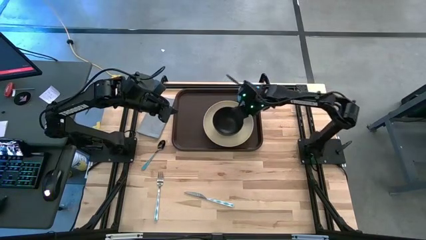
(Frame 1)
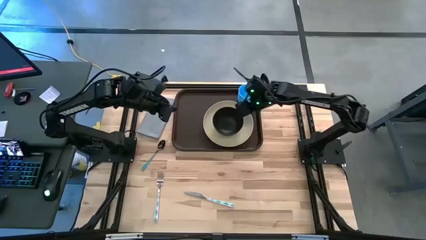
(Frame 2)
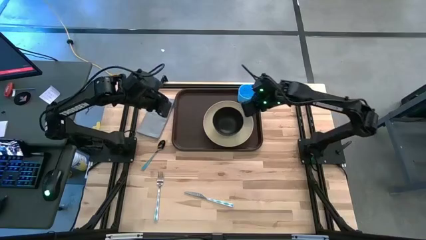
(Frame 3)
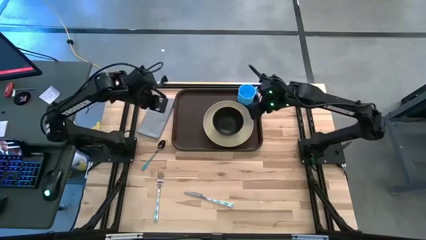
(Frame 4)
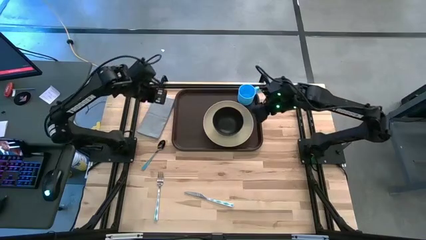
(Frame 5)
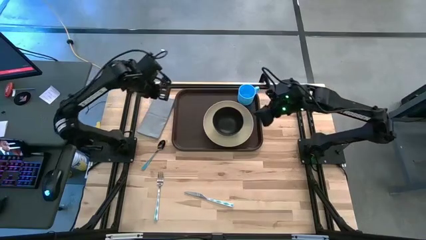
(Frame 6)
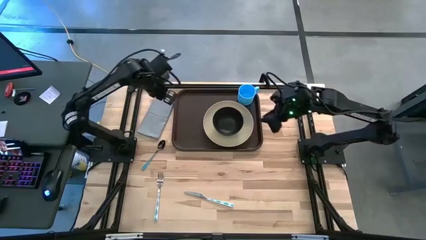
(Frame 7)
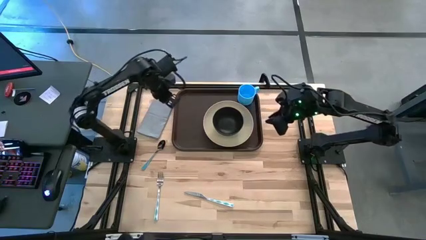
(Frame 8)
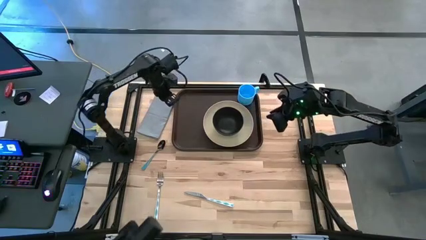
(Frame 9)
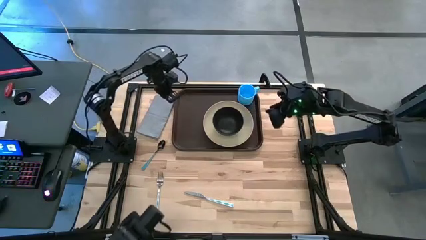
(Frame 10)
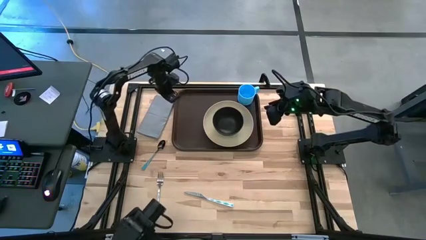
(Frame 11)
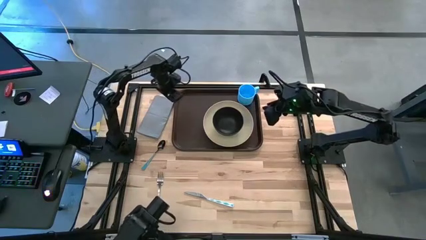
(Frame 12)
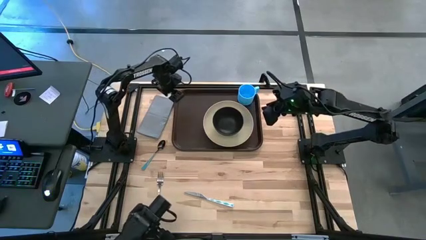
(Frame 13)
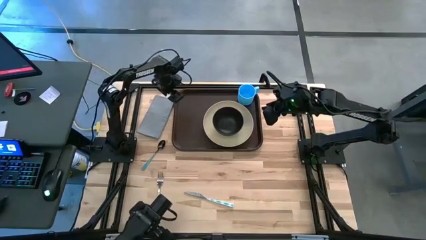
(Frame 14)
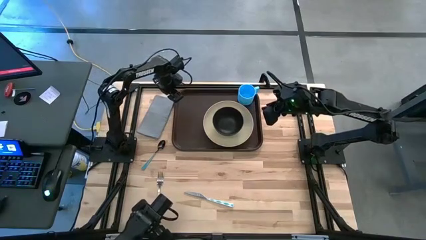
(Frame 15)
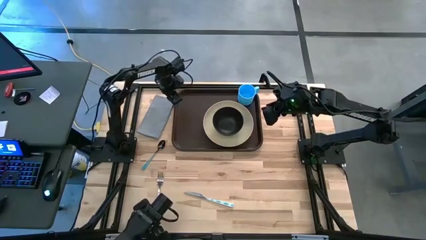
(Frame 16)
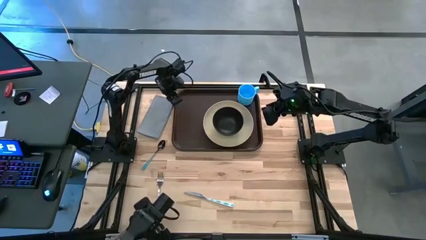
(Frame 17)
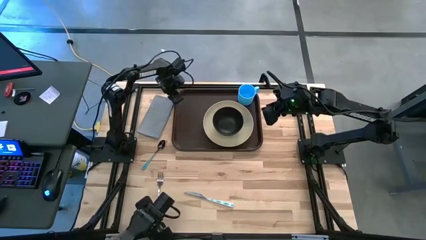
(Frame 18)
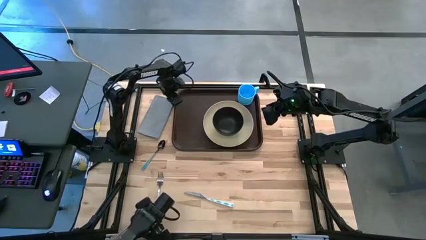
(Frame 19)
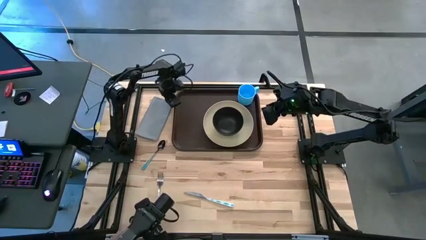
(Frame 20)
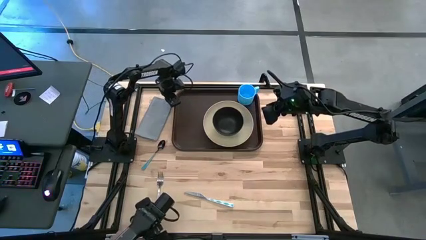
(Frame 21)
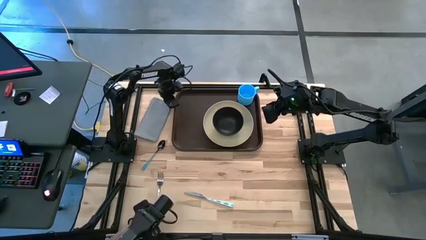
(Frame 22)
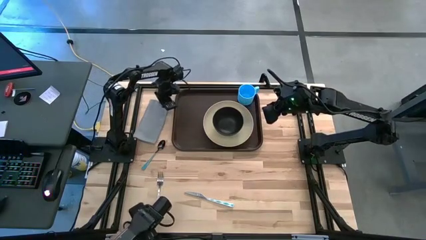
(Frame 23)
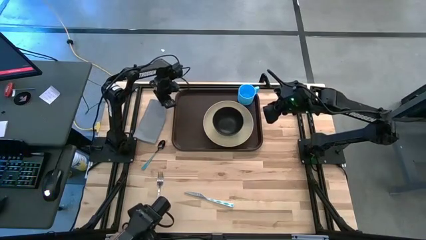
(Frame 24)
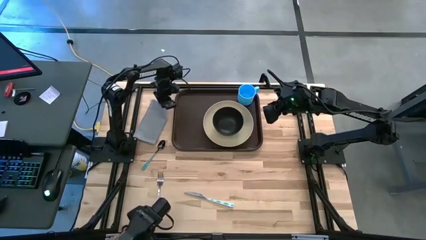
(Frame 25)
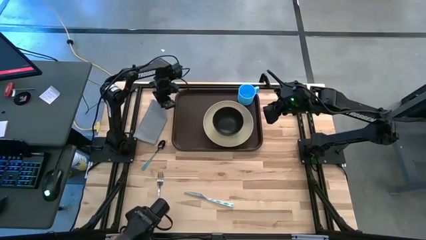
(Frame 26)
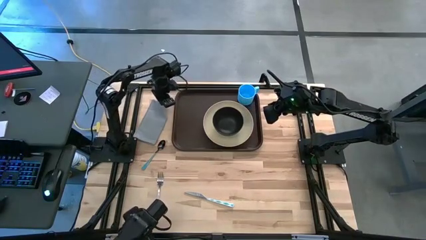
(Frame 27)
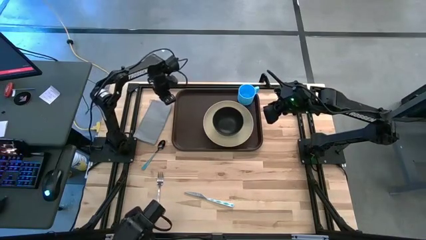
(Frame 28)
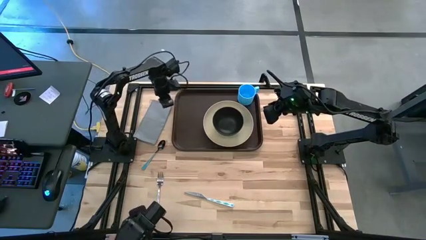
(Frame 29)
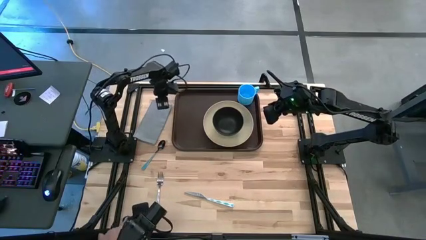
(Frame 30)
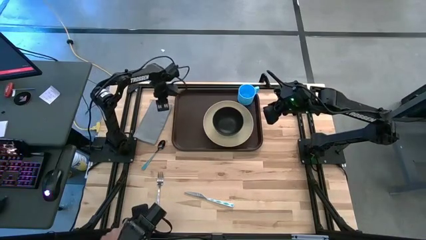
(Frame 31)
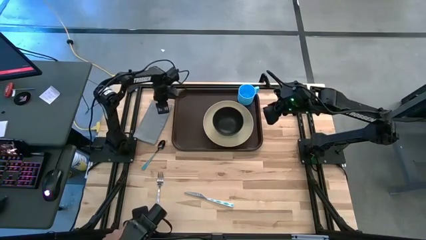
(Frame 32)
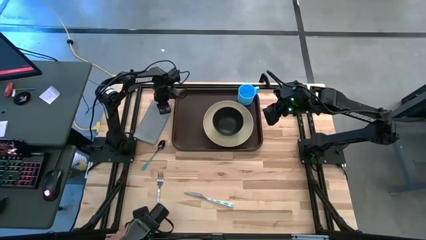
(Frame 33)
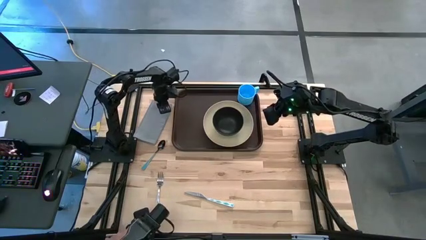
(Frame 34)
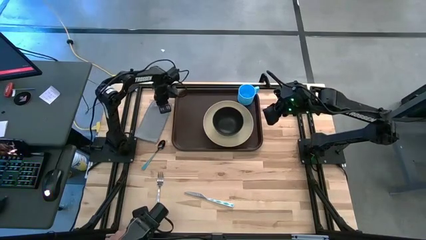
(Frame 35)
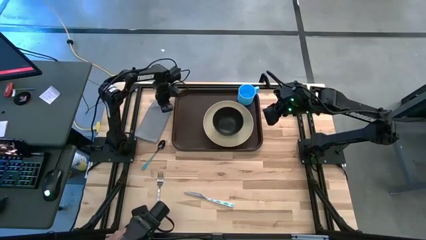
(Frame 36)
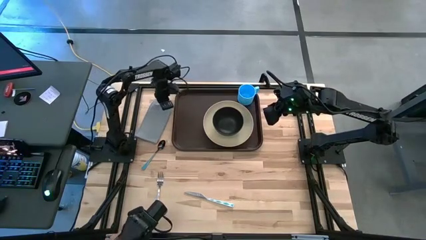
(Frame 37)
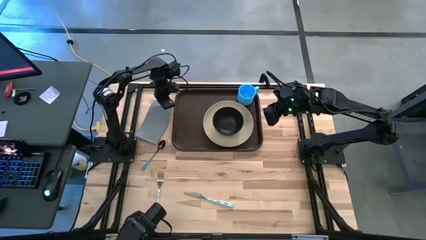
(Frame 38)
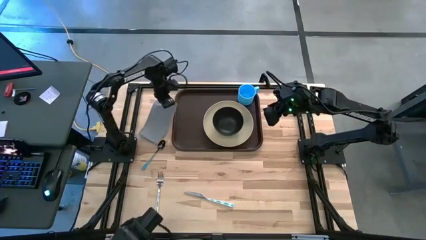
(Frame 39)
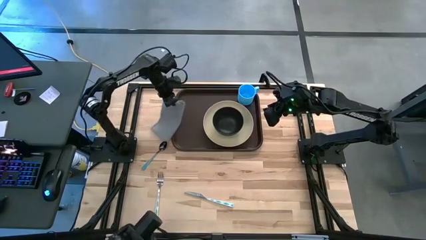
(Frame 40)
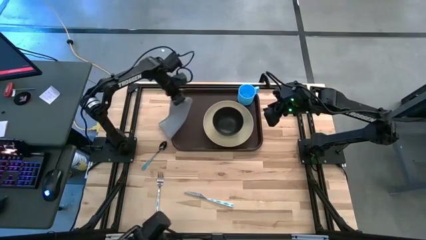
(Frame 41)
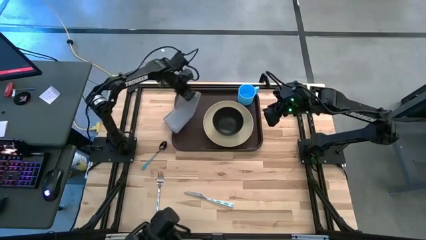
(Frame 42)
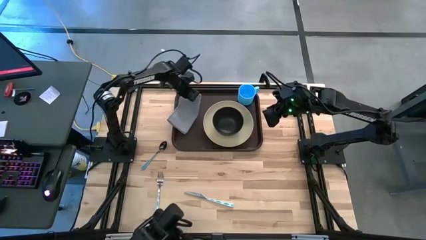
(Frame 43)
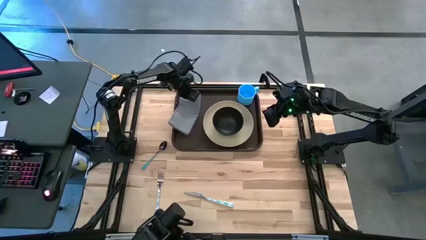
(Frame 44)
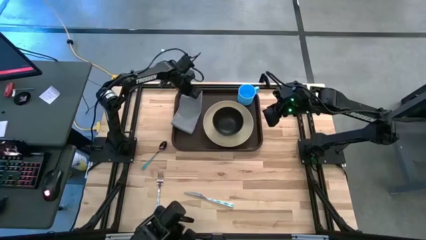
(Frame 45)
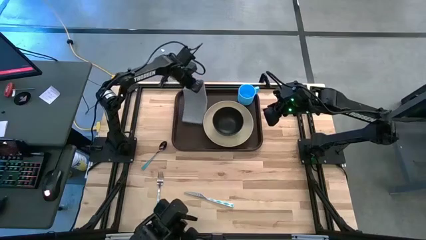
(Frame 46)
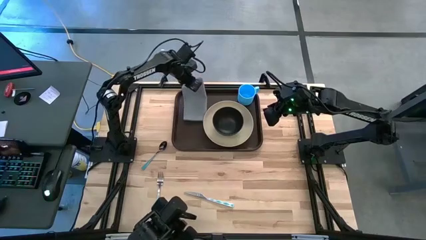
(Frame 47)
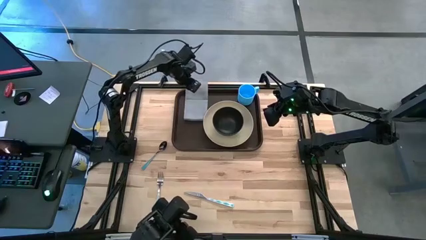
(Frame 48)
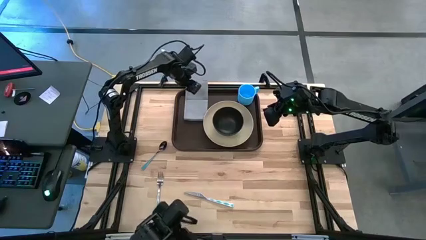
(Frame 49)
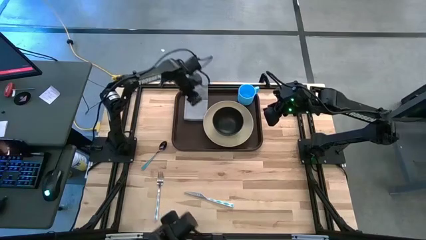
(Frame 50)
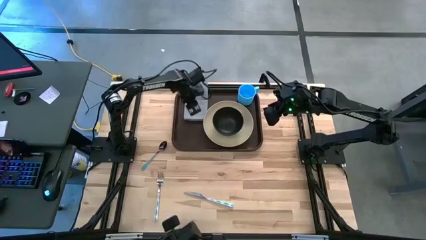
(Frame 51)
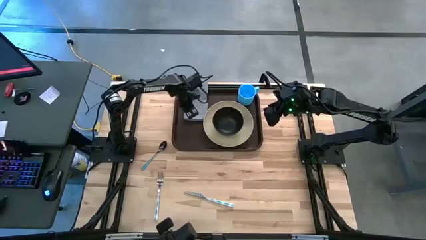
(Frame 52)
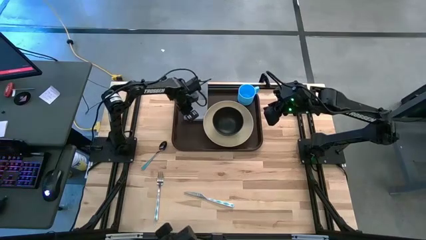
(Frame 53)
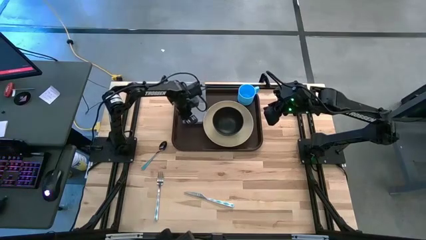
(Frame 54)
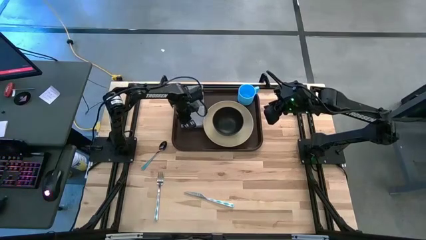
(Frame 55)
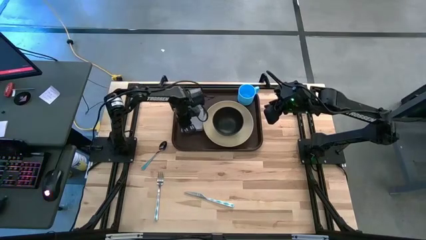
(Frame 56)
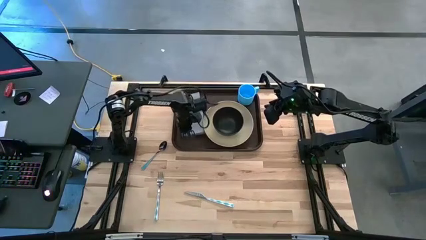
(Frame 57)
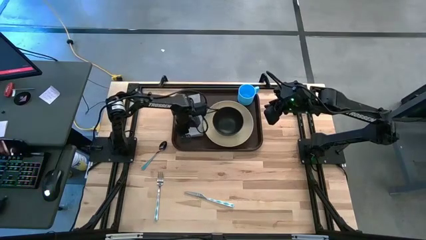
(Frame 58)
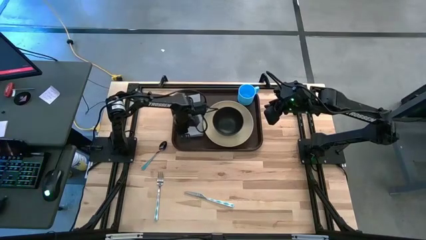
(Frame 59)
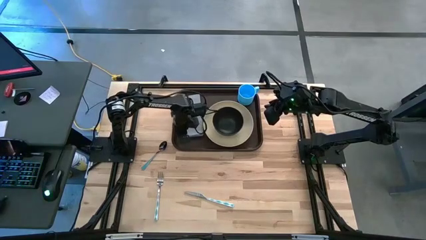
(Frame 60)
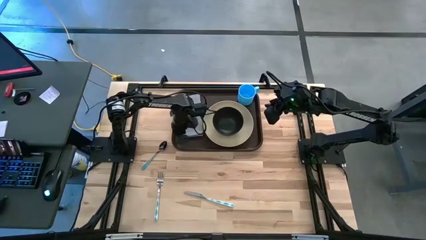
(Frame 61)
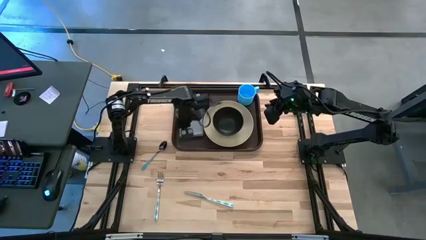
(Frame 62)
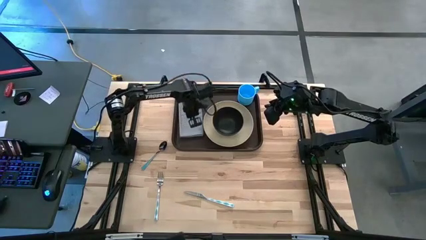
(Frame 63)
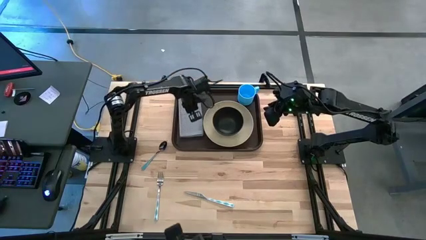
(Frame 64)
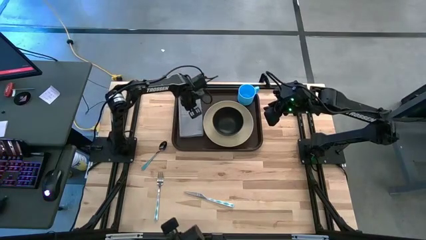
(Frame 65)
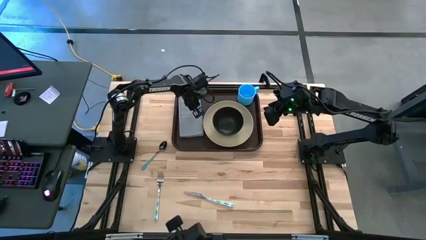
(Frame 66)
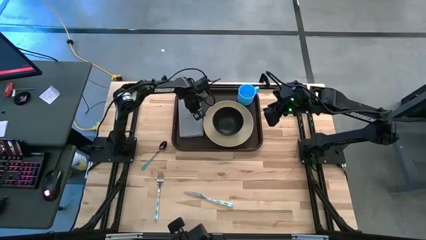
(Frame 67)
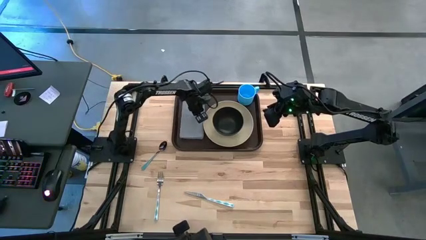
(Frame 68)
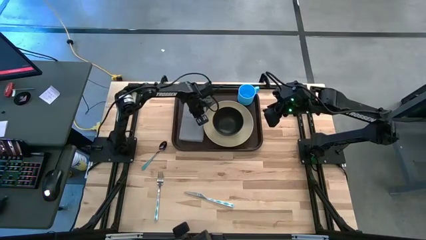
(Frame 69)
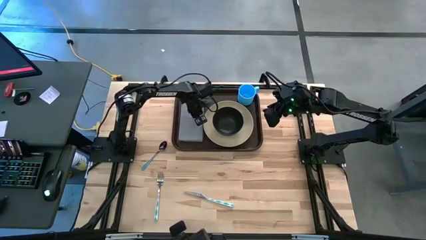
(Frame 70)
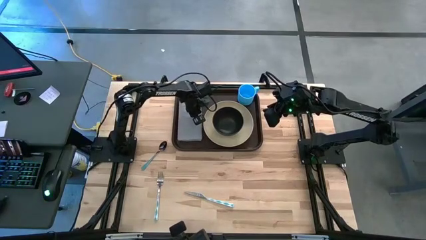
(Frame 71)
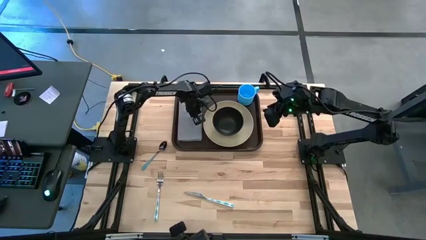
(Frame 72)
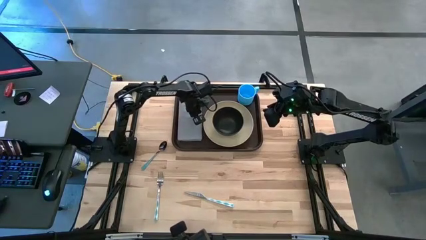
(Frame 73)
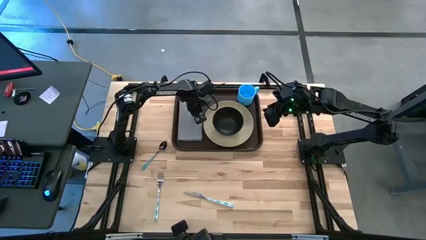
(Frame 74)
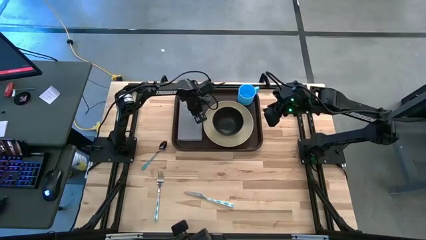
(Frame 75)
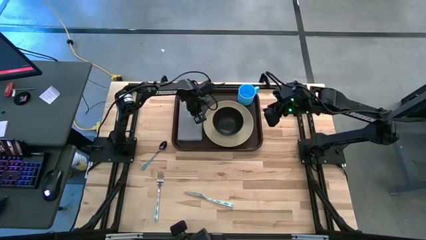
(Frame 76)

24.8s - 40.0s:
Task: Set up tray
Put the gray napkin on the brown tray to the left of the white plate

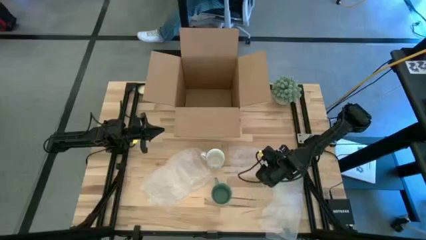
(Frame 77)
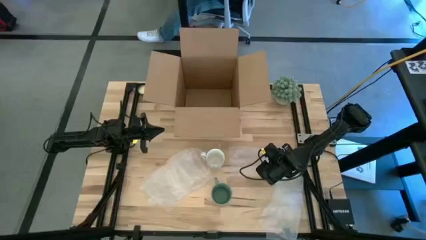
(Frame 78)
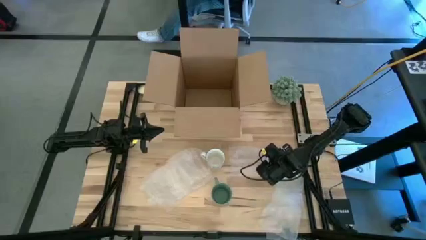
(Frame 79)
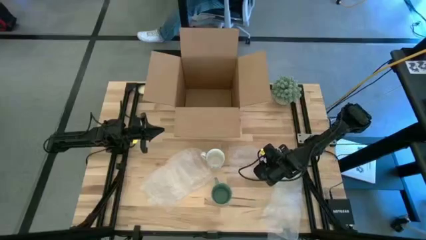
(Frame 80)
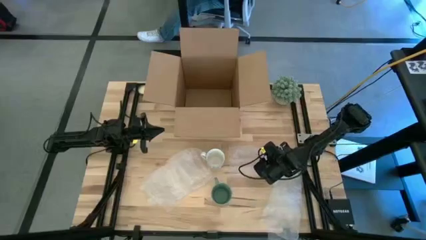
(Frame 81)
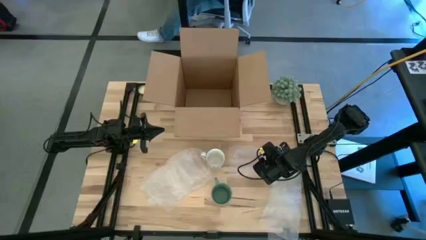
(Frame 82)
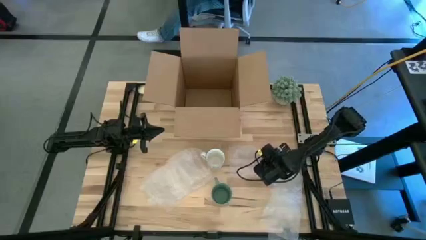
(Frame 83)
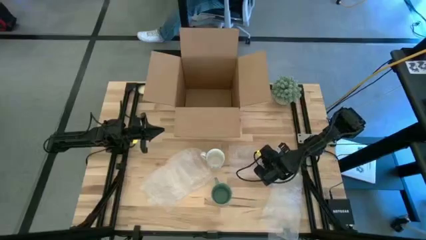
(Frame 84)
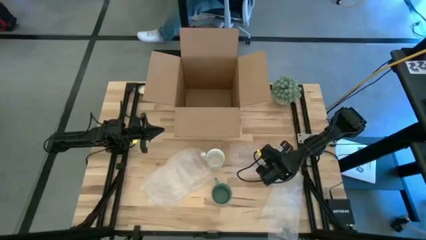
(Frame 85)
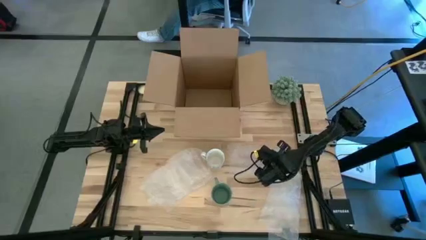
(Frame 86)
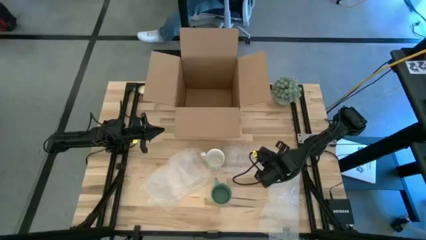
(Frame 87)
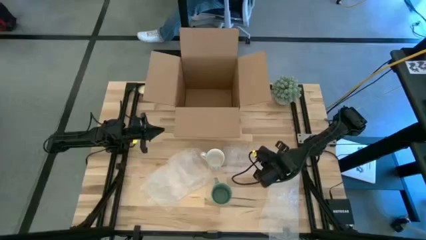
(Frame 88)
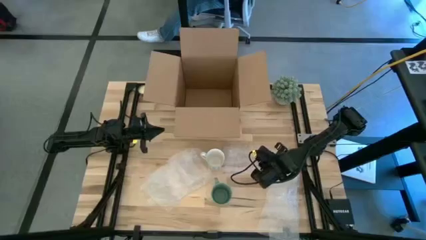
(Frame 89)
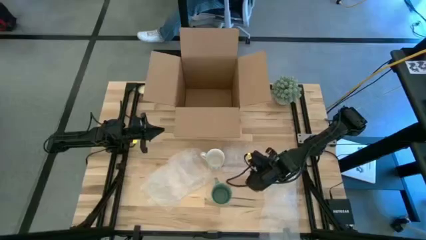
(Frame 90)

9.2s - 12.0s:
Task: wrap mug
Prepare the right transparent bubble wrap
